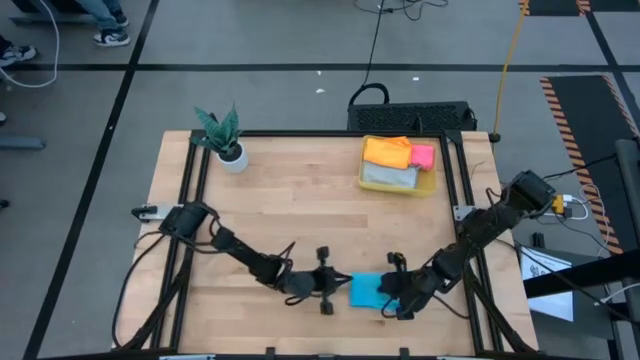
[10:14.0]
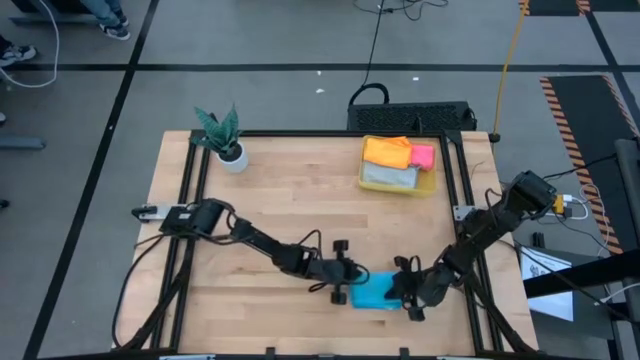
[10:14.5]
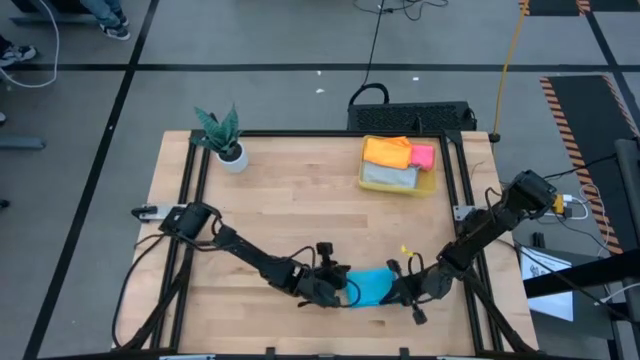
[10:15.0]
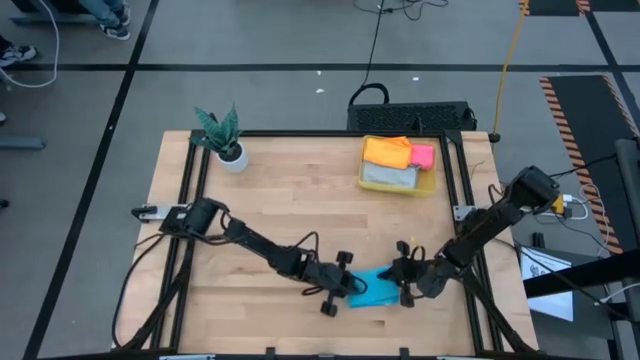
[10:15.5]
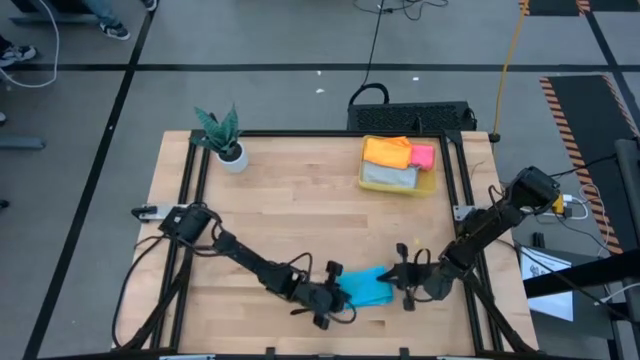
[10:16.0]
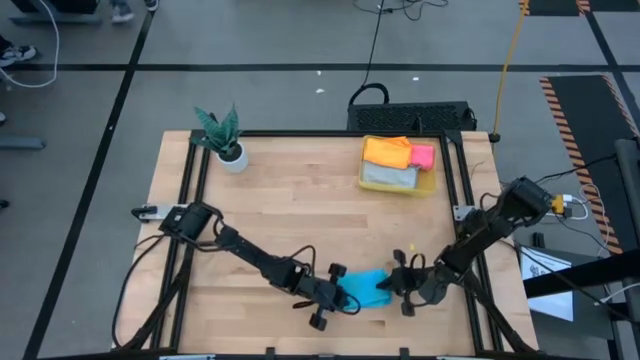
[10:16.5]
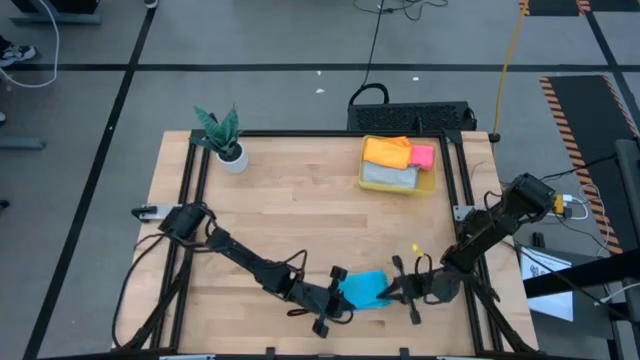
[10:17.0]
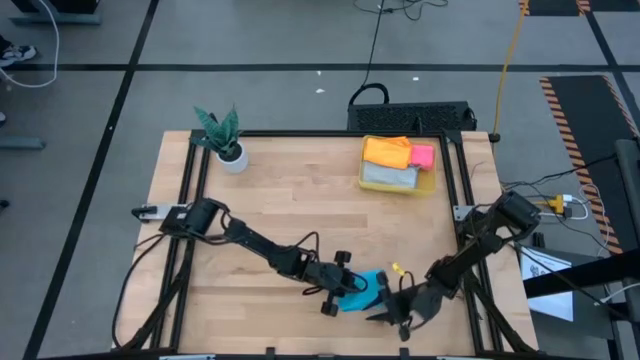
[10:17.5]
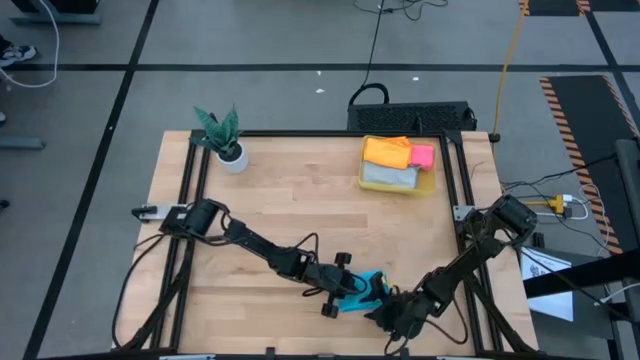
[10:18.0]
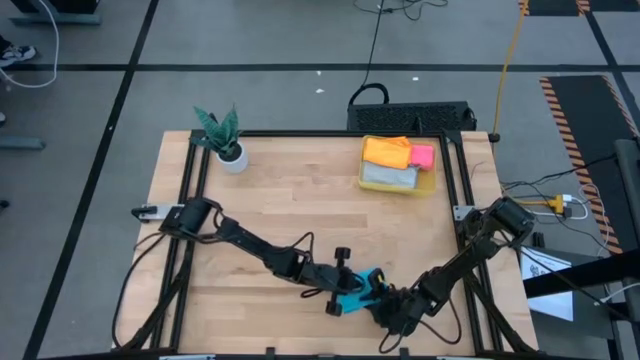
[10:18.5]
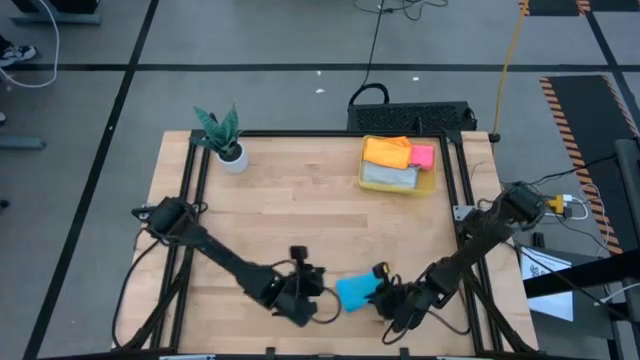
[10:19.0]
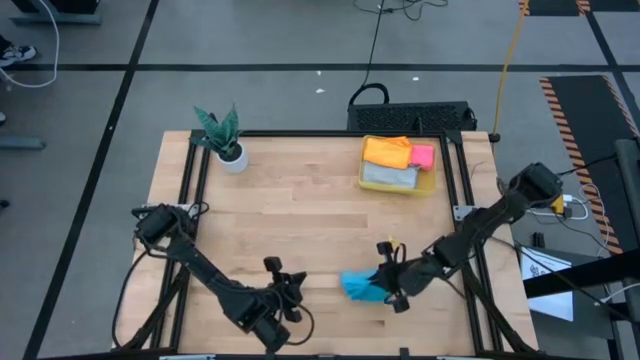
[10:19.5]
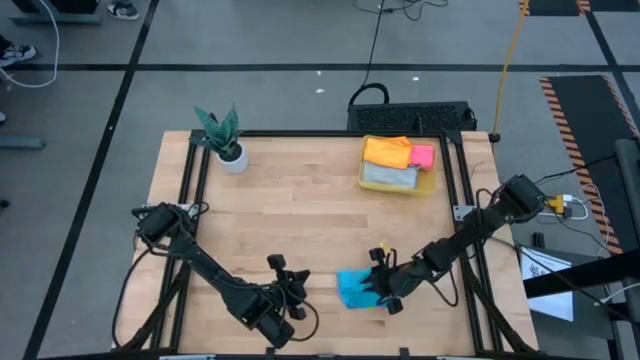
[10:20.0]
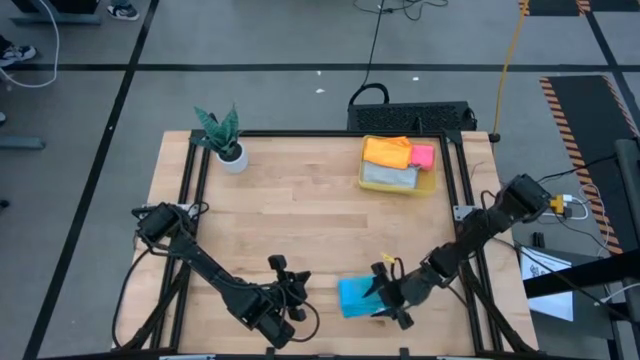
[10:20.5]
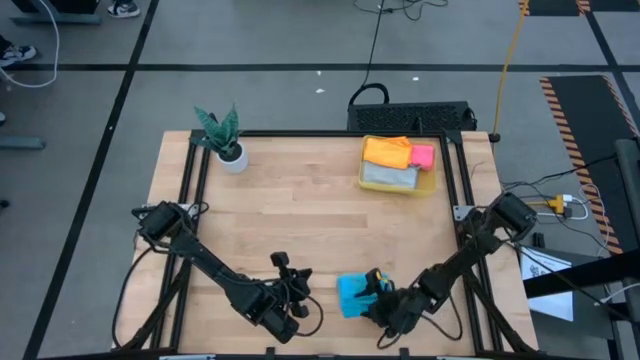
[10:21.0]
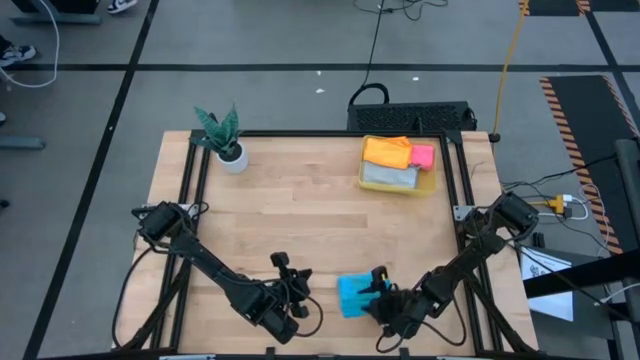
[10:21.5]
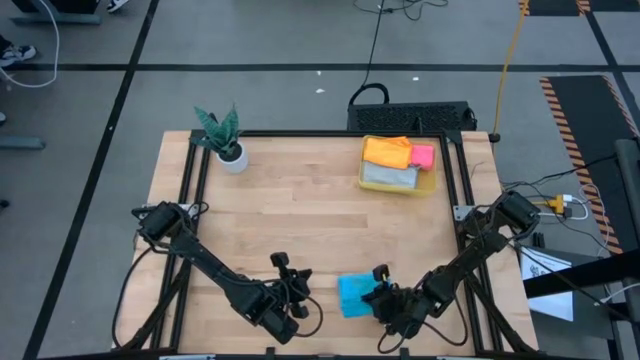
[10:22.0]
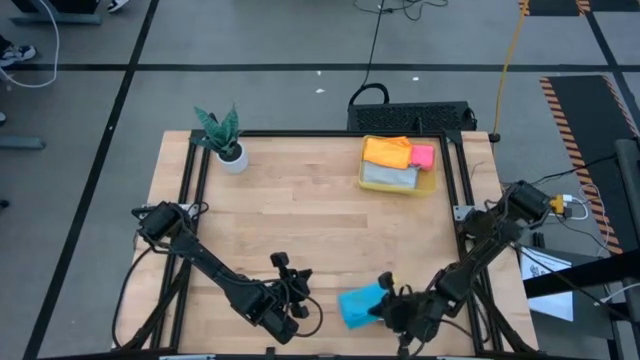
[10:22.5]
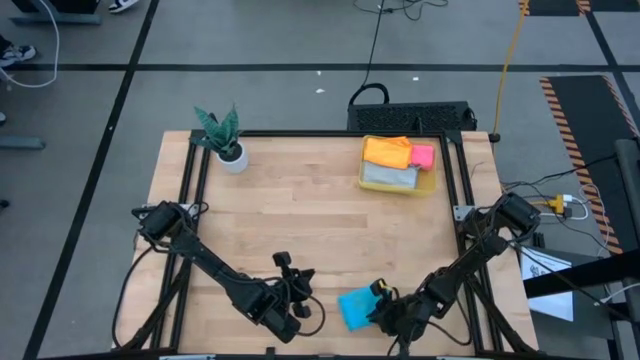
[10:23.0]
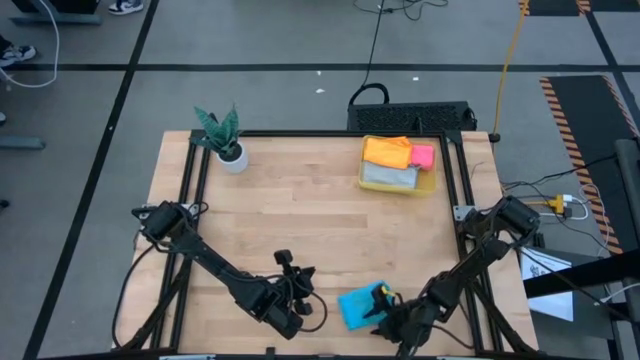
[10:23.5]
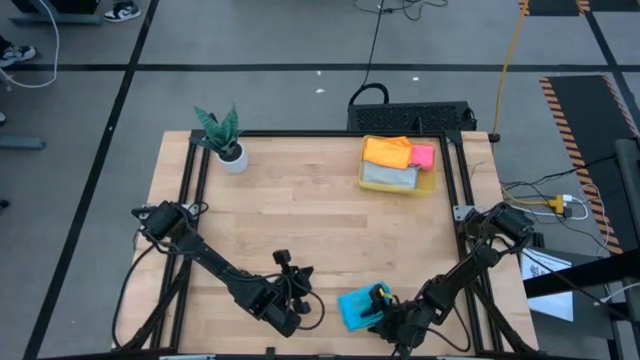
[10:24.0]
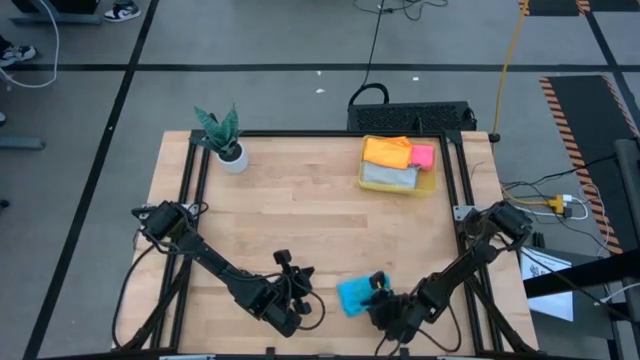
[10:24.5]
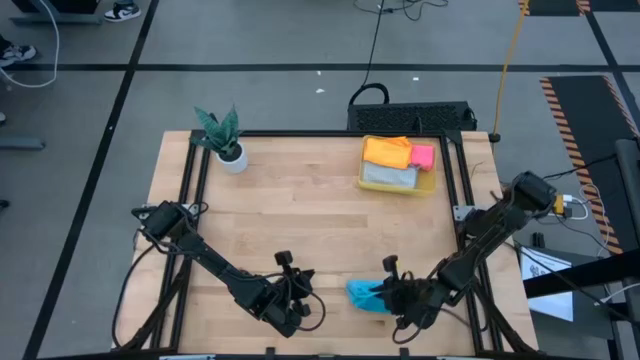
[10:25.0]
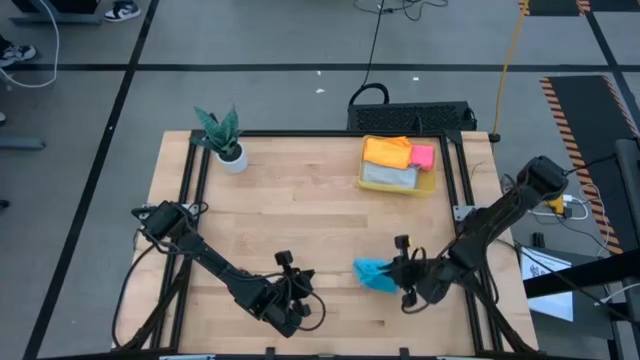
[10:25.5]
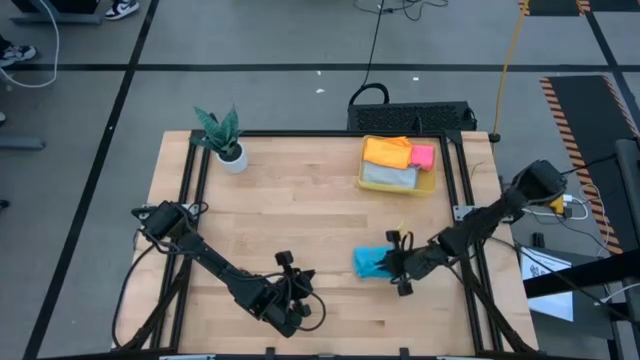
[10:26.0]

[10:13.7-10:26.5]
Task: Fold microfiber towels
Fold the blue kitchen towel

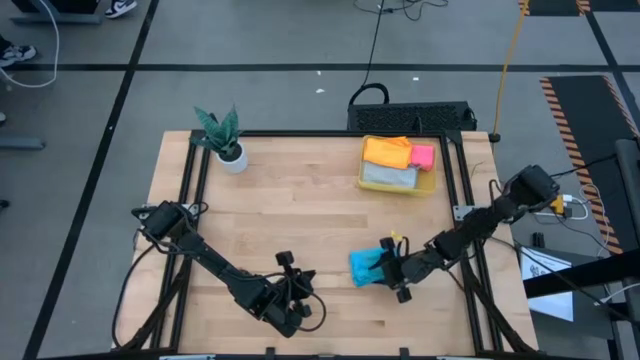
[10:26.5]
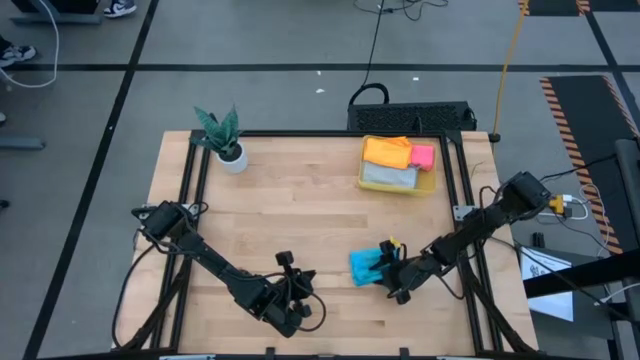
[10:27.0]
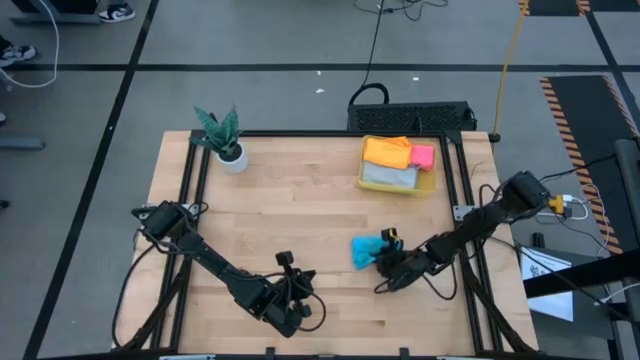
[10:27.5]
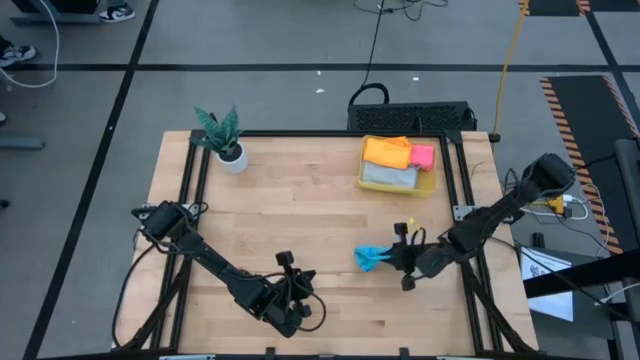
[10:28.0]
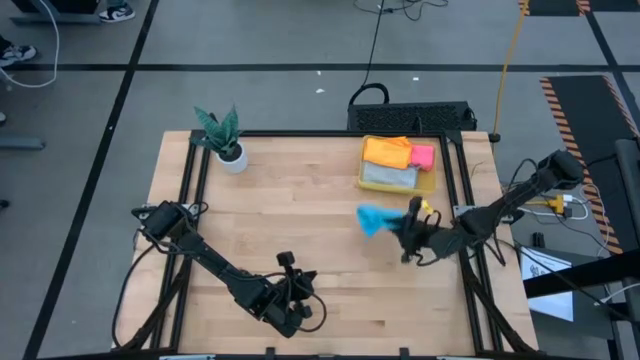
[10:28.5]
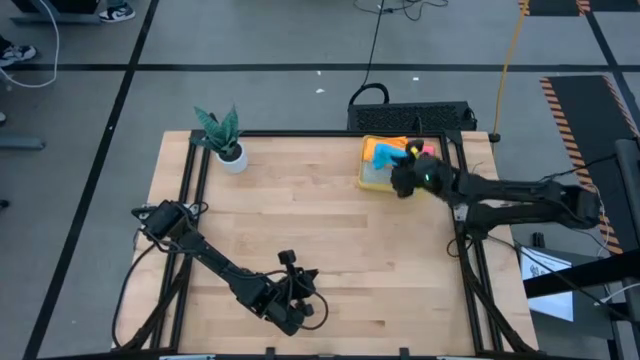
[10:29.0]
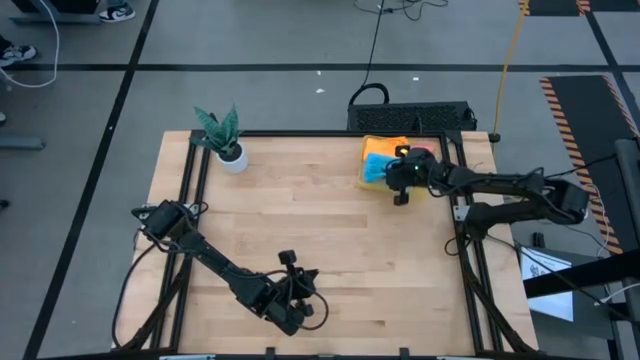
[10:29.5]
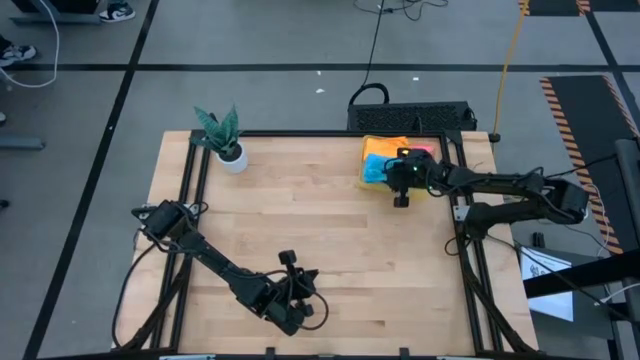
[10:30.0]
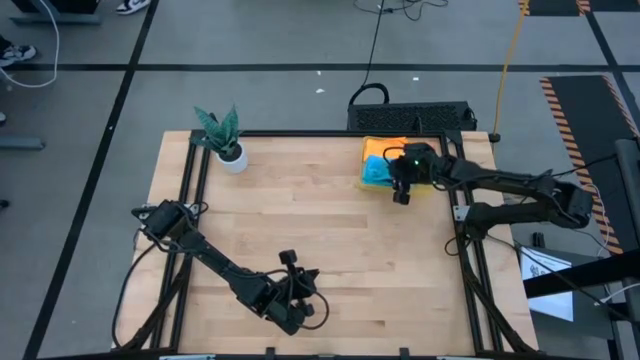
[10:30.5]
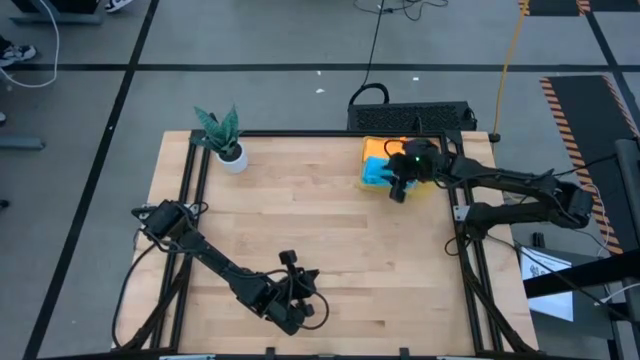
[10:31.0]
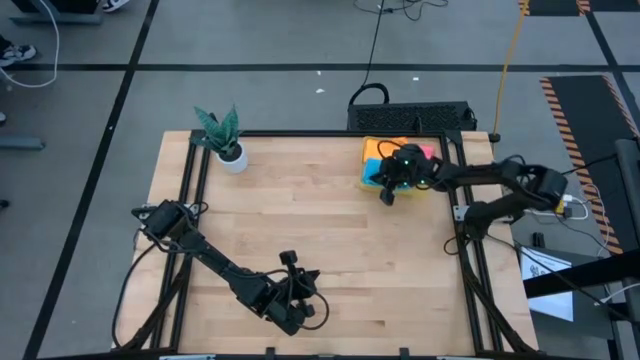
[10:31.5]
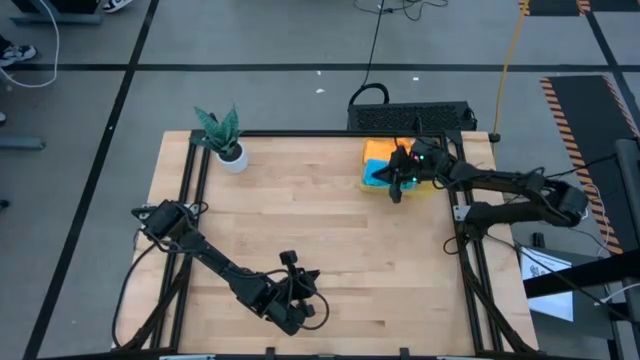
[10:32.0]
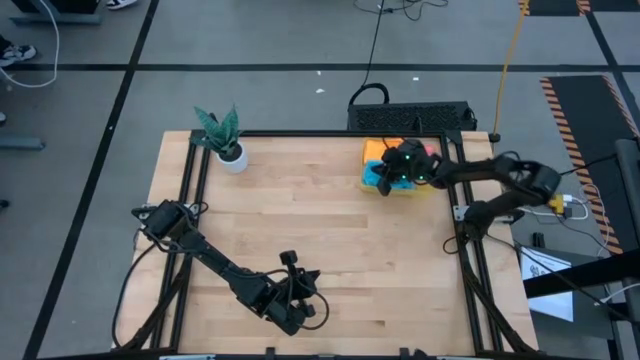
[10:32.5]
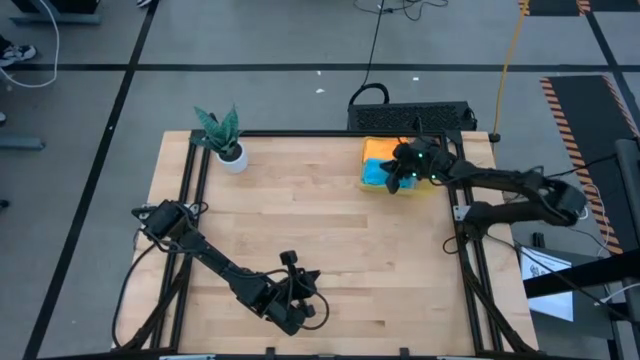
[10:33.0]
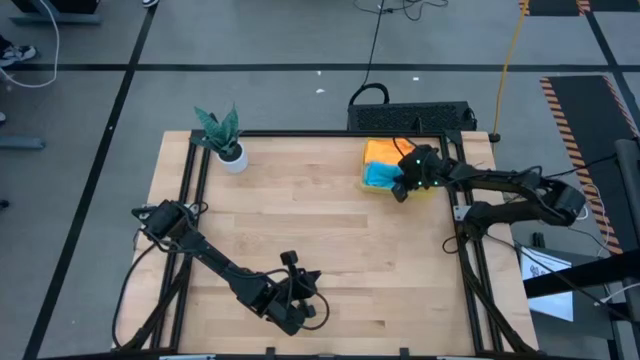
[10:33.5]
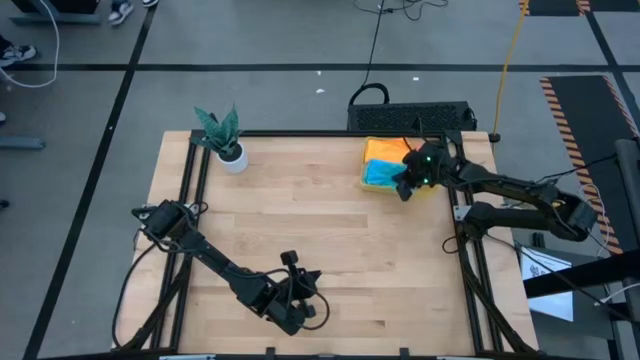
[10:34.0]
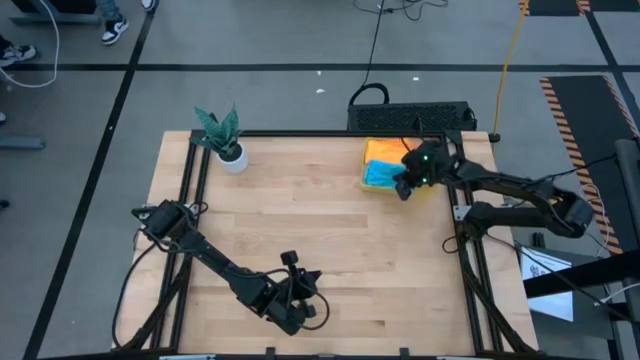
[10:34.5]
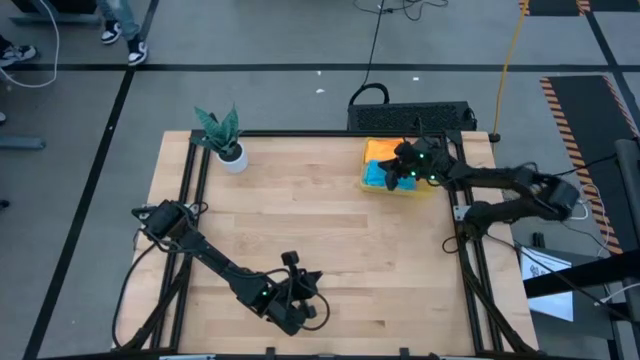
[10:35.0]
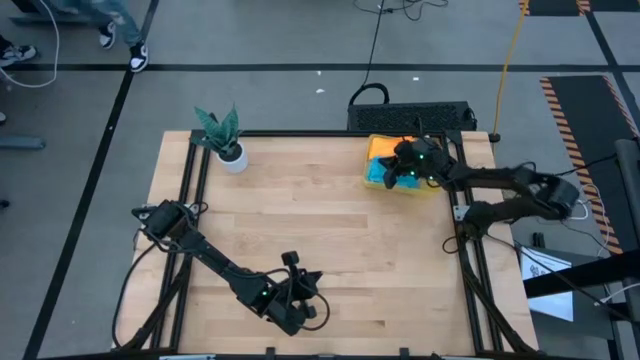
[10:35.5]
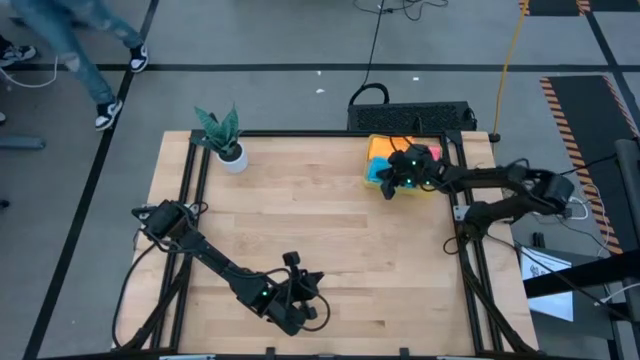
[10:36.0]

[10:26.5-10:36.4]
Put the blue kitchen towel into the yellow bin
